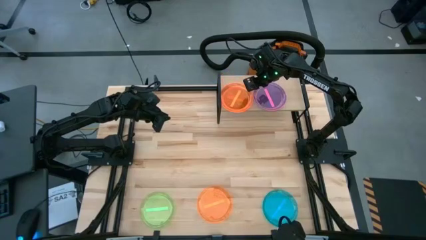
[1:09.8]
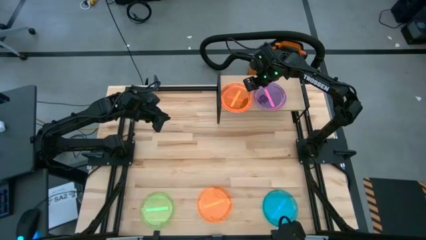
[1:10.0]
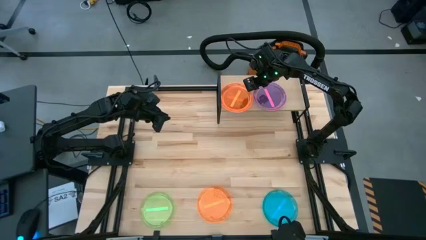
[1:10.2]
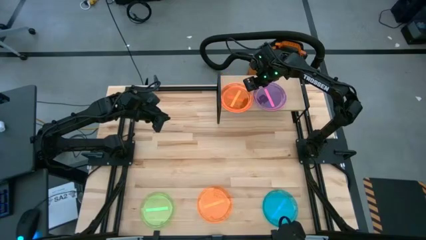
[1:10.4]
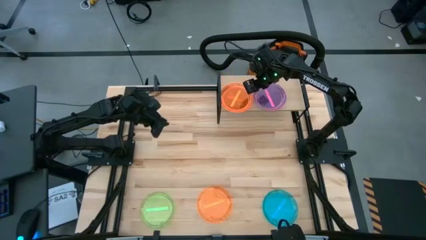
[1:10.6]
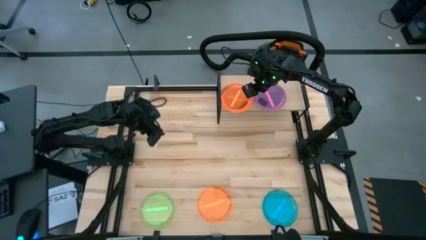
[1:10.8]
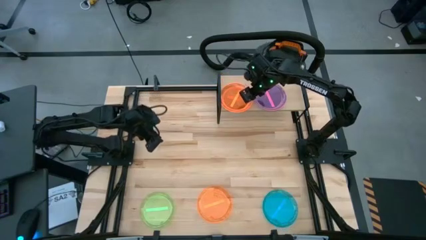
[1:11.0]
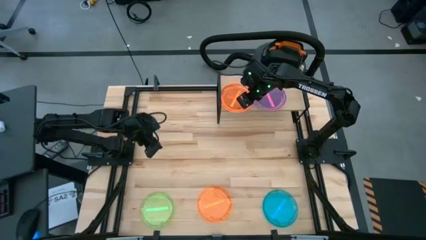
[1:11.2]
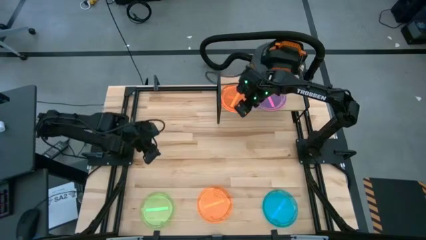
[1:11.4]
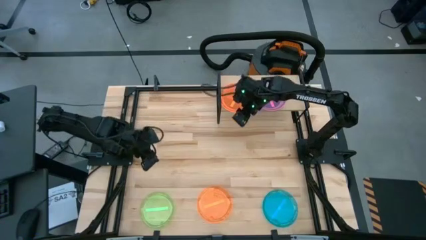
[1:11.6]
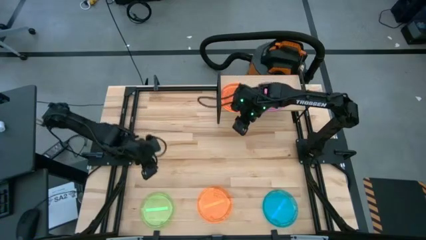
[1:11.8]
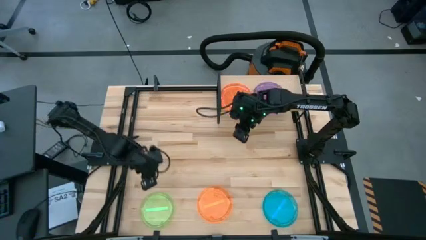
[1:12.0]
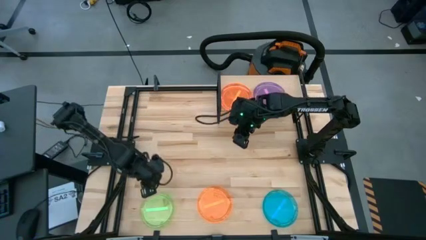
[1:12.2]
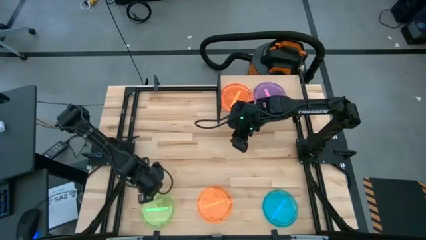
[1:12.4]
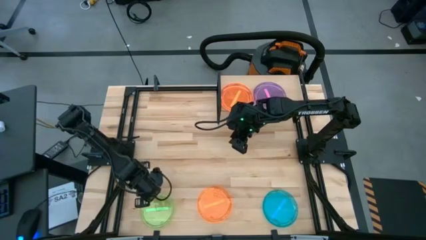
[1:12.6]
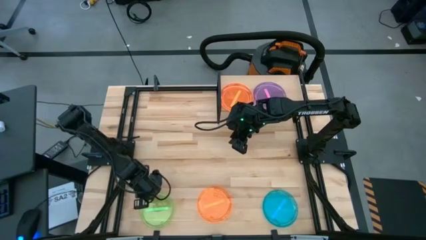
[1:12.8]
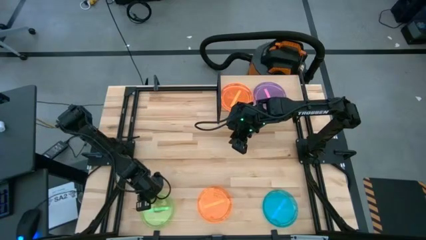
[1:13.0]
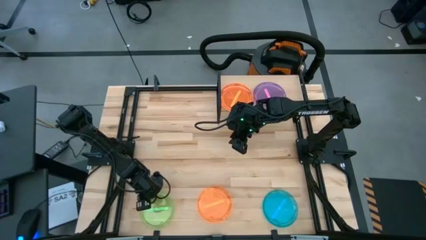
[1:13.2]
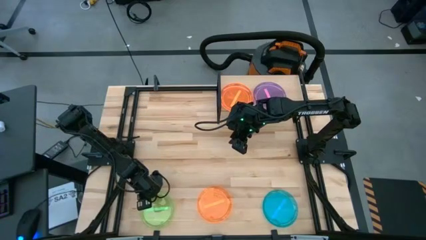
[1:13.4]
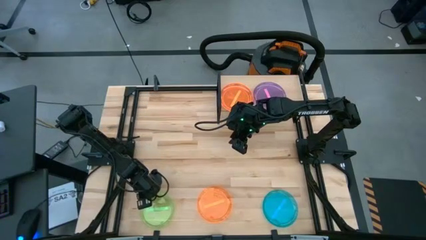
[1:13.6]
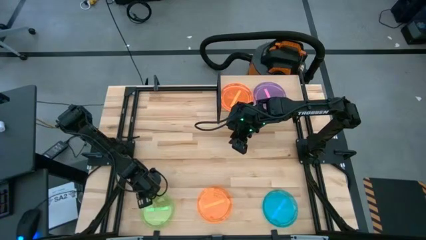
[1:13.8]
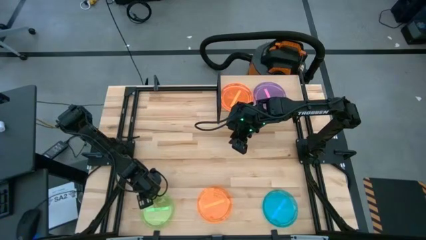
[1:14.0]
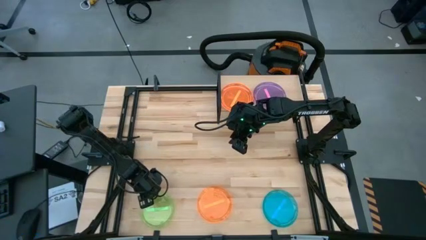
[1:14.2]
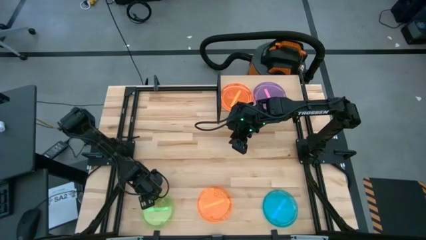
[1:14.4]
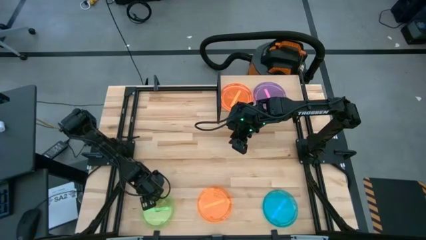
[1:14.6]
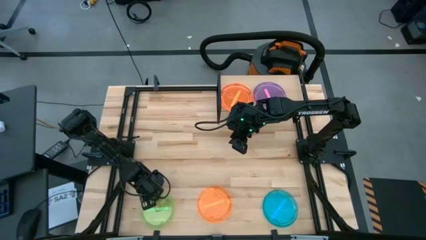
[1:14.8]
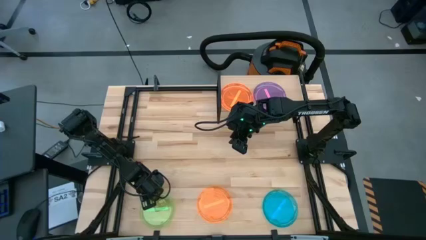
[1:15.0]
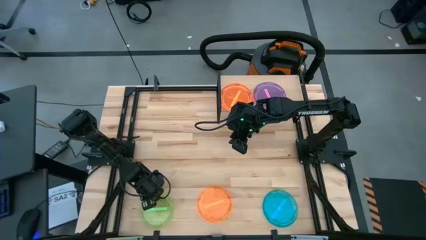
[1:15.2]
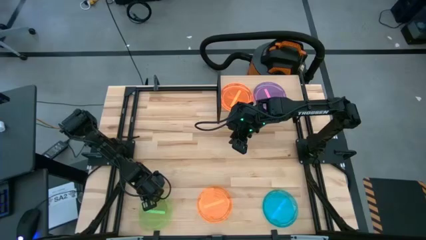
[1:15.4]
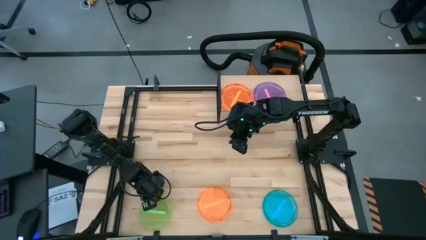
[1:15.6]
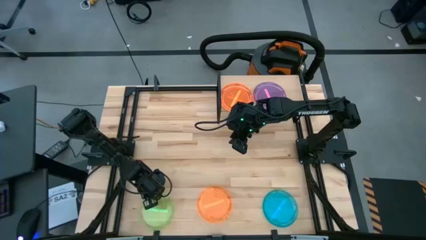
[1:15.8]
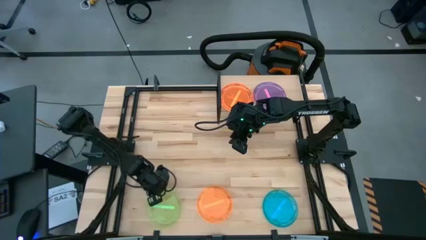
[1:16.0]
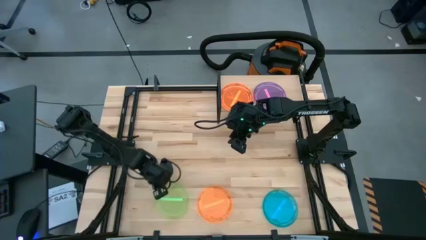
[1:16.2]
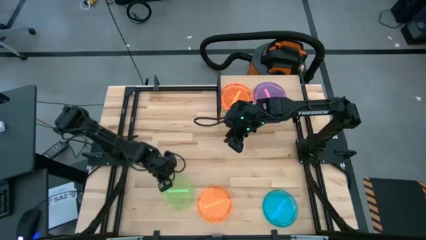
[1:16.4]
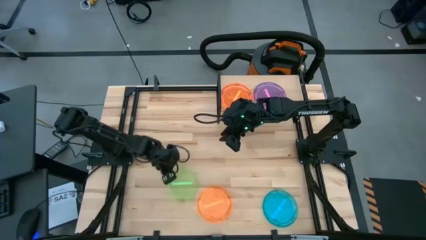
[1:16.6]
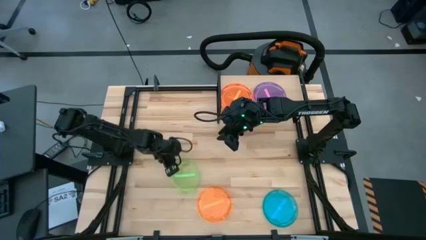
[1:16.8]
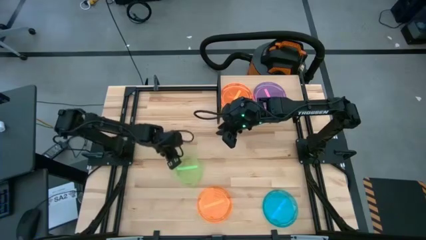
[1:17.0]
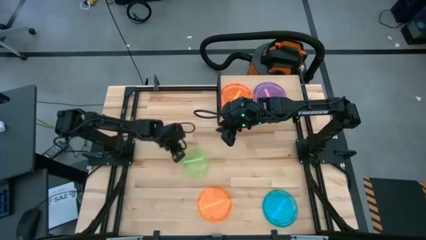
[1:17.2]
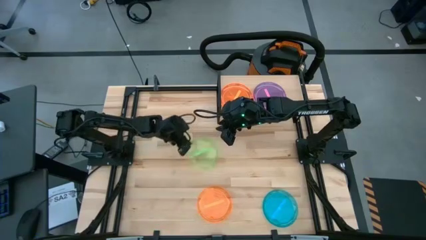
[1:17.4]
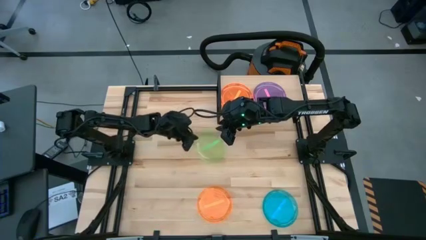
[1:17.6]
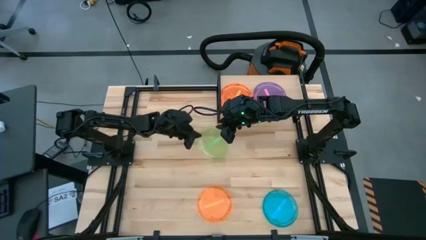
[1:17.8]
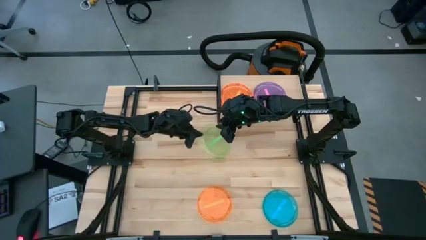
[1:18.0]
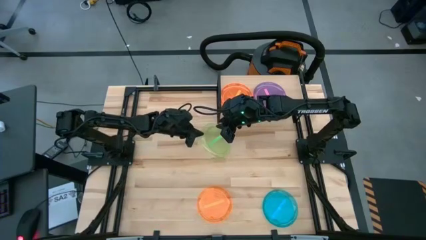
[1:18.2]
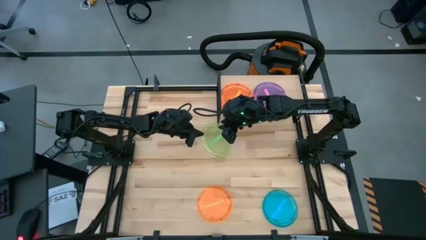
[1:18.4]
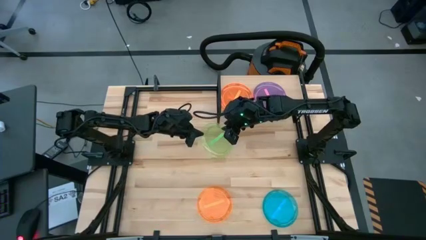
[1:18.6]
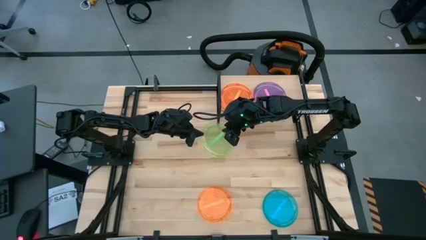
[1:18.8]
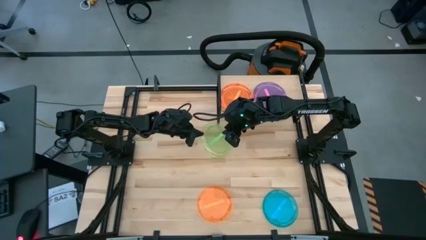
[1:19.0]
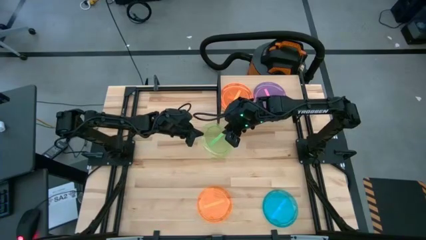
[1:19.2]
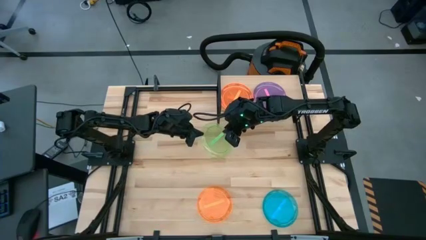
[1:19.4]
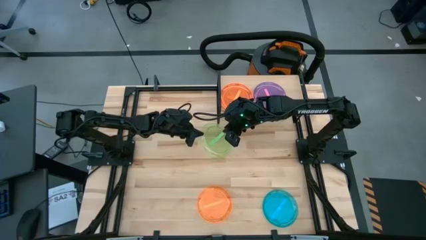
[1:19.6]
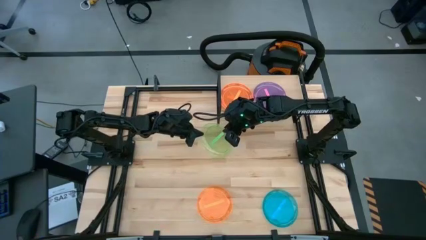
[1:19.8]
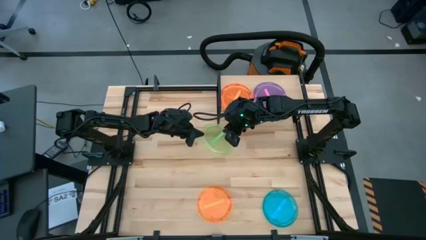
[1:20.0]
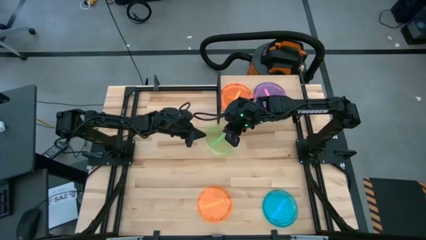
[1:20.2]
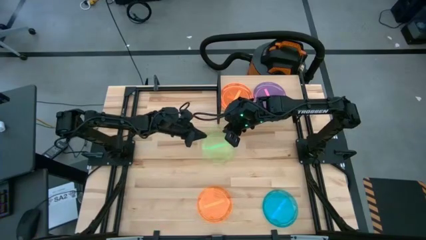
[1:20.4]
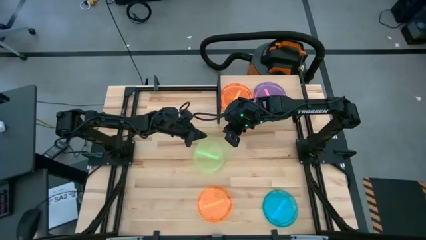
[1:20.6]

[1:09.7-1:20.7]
Task: Place and stack plates onto a shelf
Stack the green plate on top of the pink plate on the shelf
